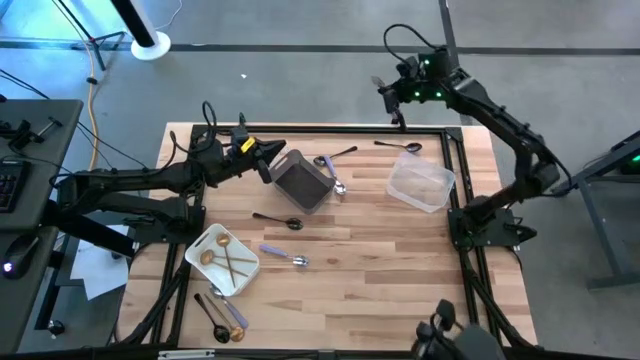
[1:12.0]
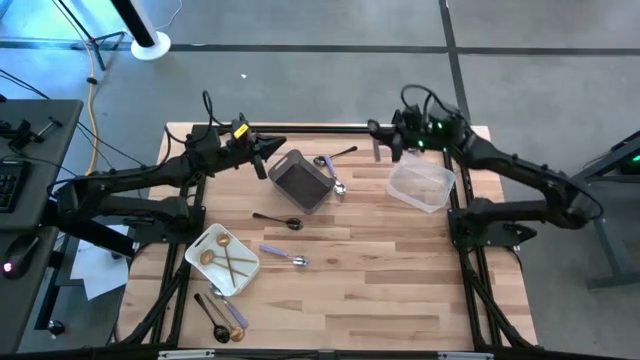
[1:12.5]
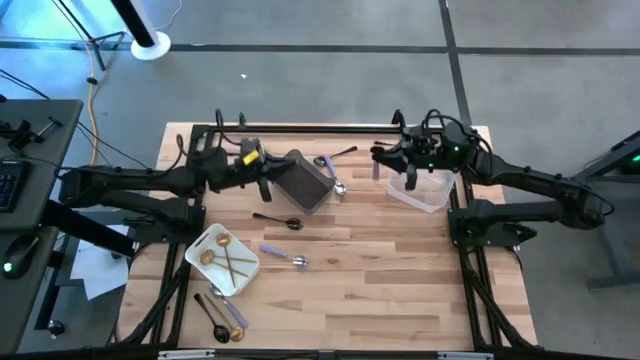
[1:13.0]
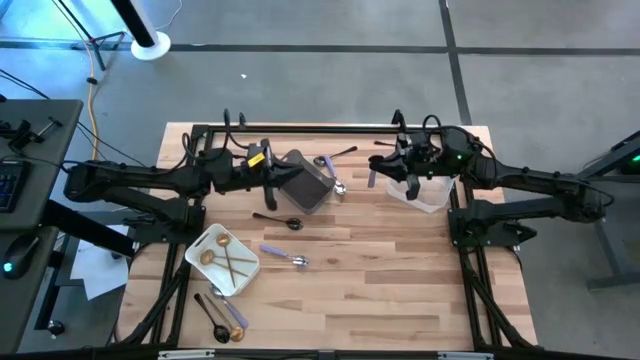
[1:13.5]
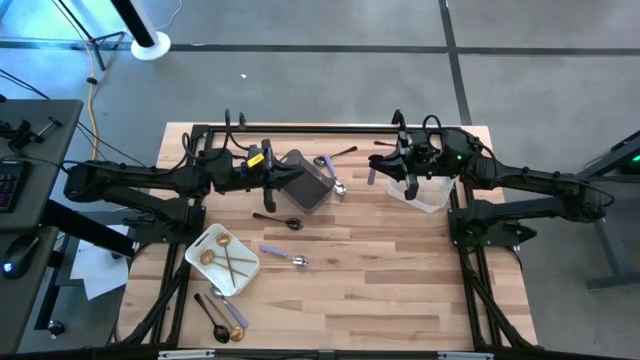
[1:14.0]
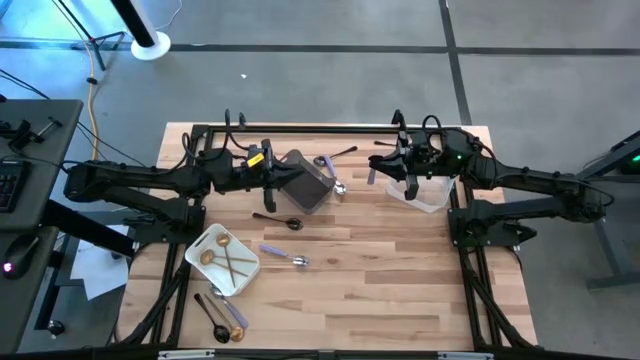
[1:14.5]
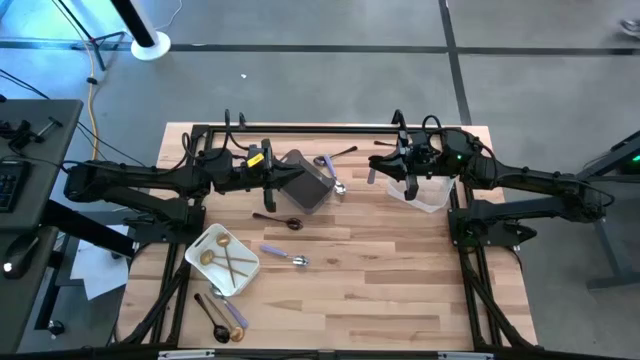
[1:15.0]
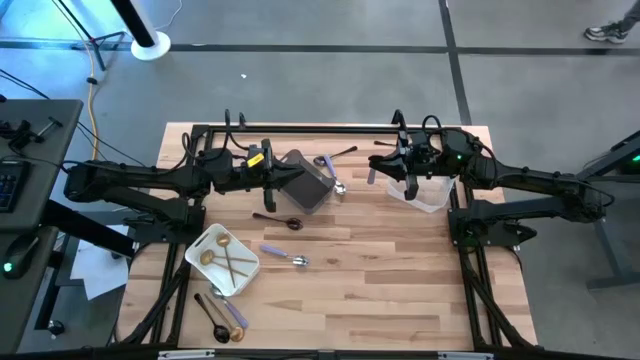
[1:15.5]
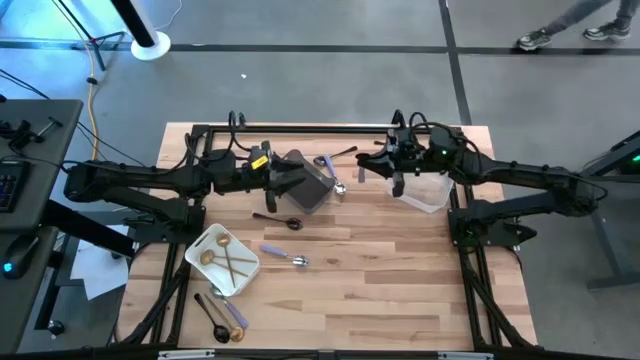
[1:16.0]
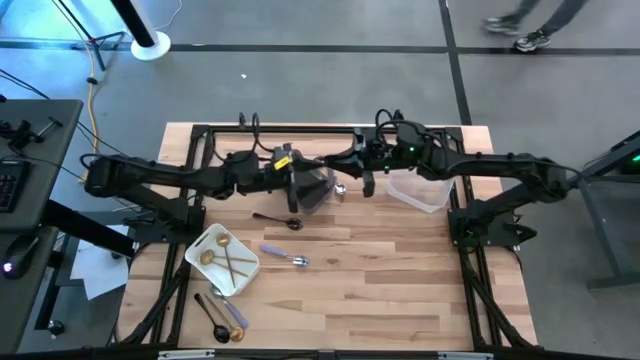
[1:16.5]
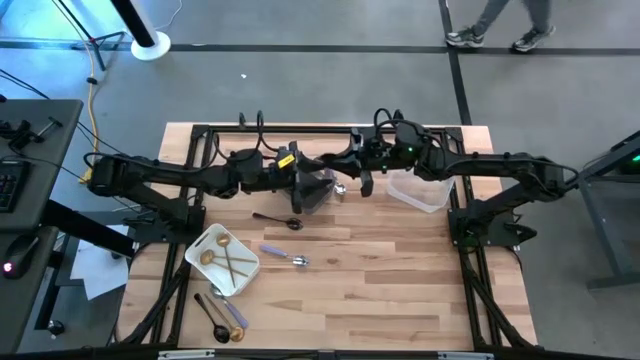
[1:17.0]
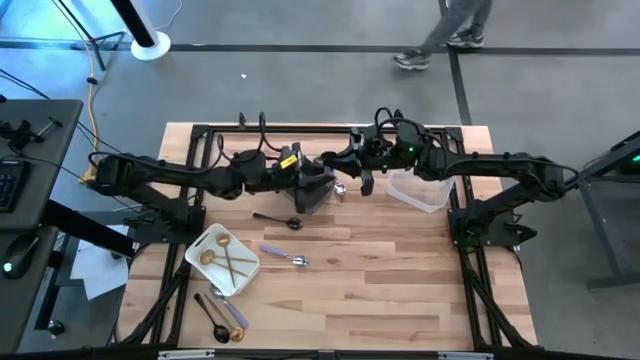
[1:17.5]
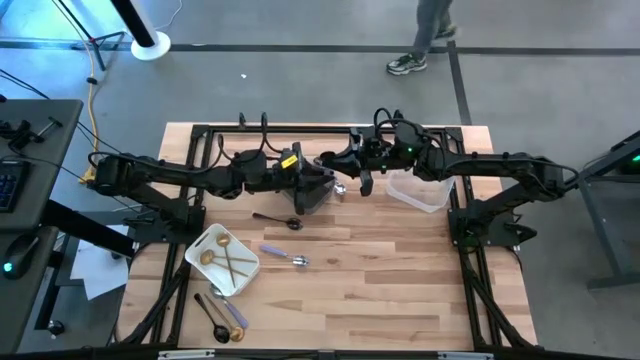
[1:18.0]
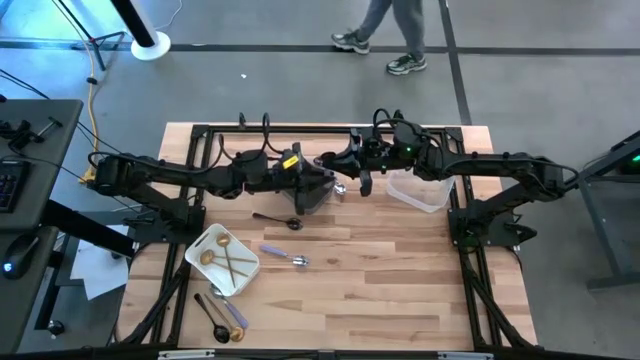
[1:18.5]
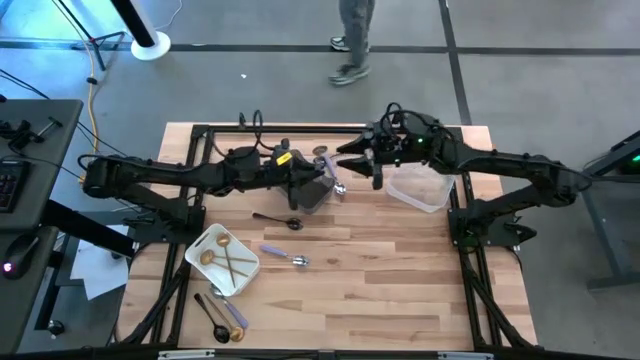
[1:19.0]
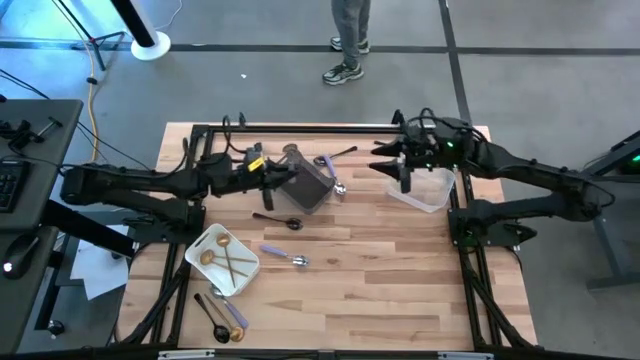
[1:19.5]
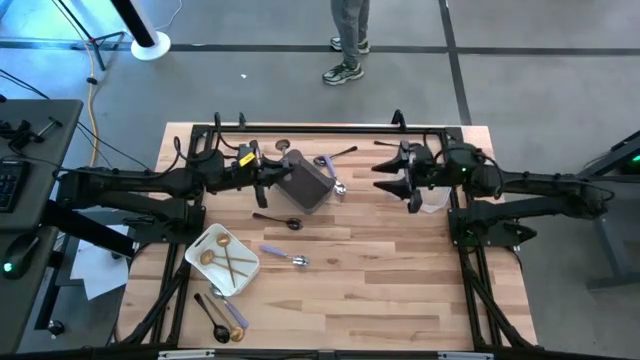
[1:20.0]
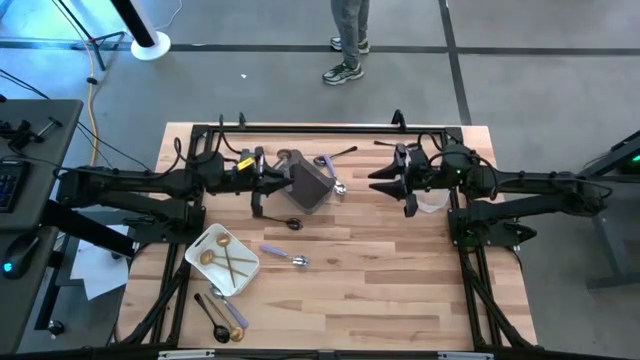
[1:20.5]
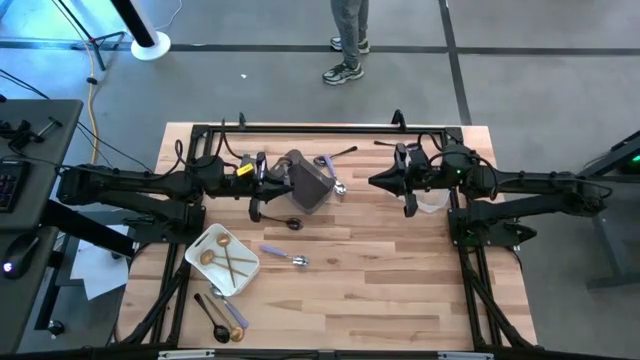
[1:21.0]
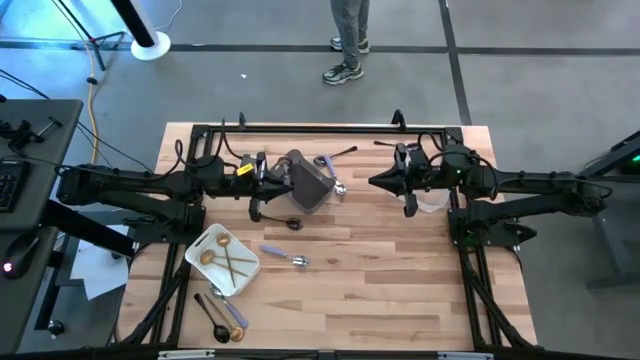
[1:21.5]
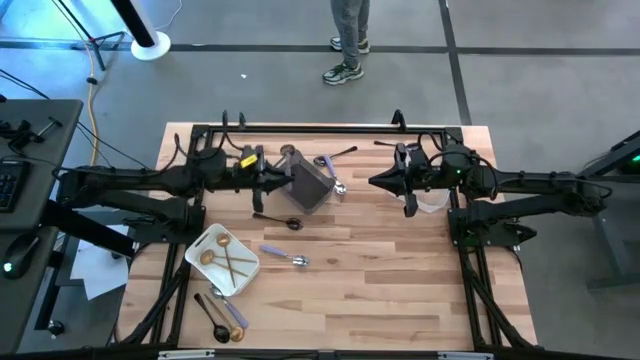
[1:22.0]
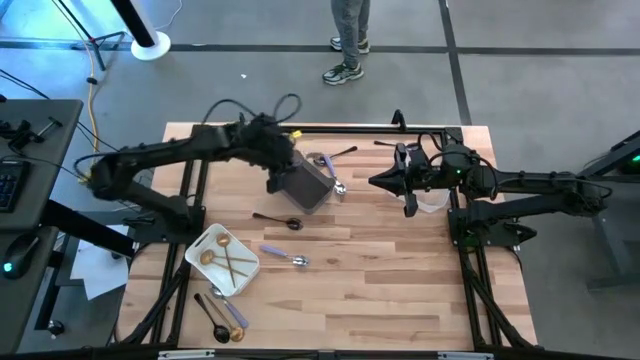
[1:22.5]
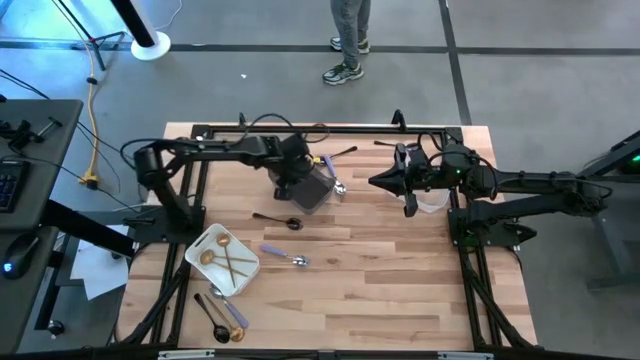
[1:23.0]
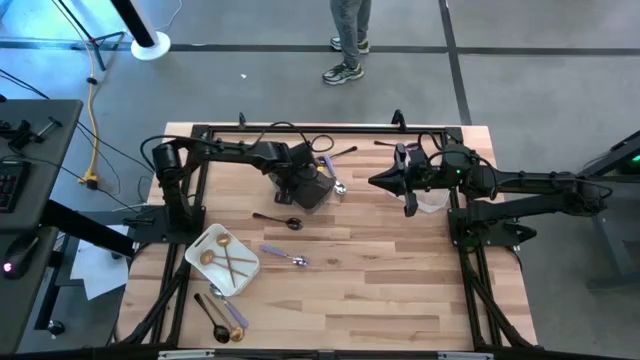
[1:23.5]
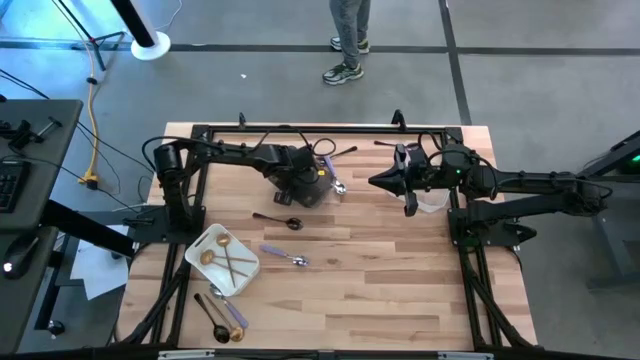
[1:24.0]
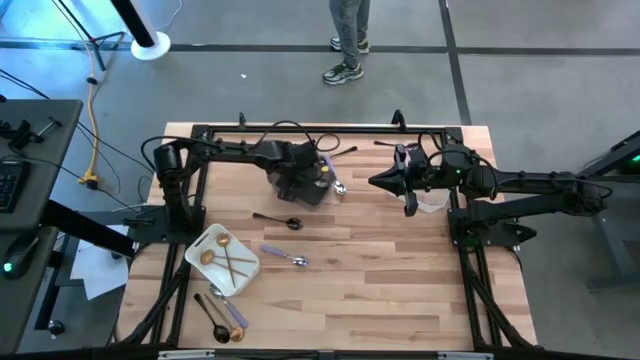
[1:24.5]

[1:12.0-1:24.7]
Task: Sort silverware by color (type)
Put the top right purple spoon into the black bin

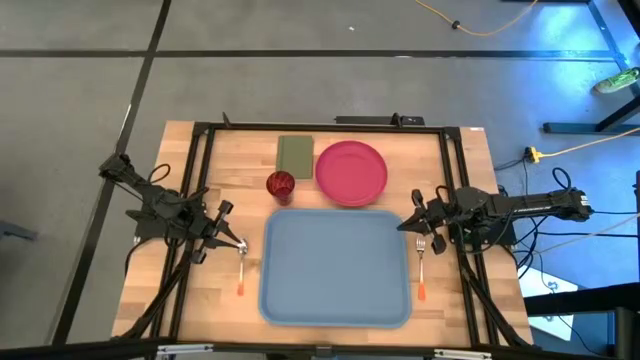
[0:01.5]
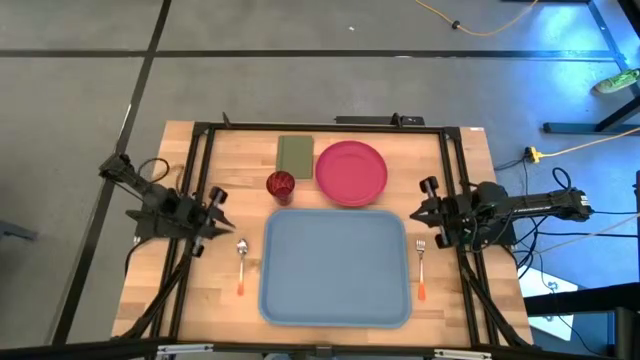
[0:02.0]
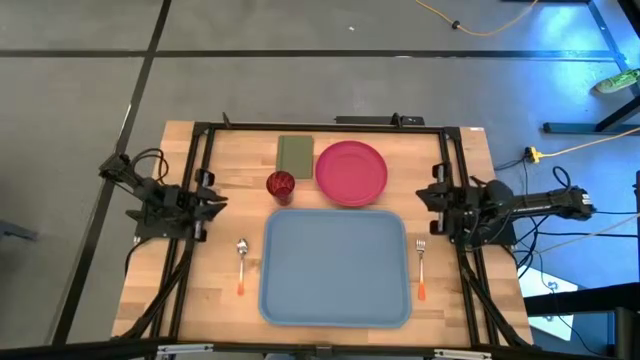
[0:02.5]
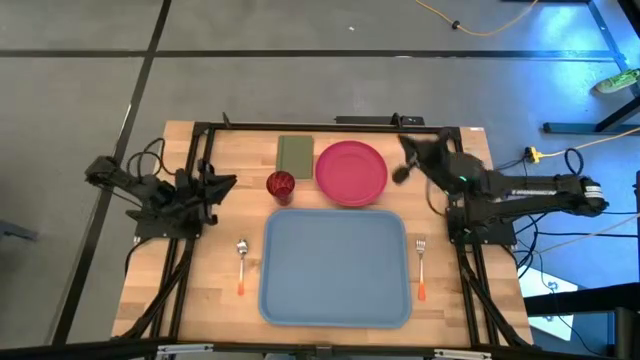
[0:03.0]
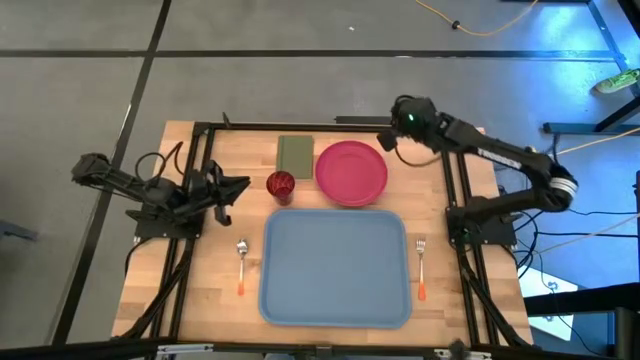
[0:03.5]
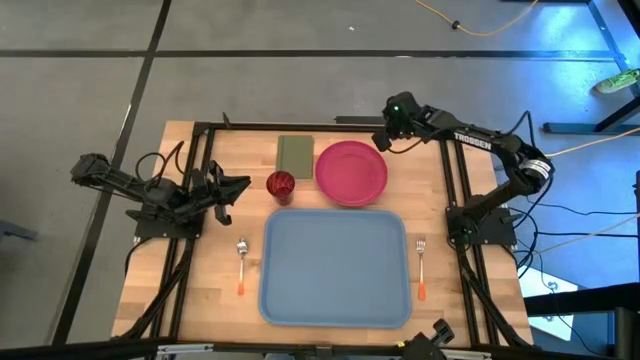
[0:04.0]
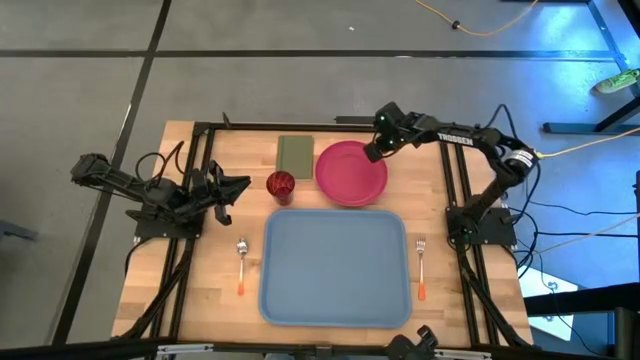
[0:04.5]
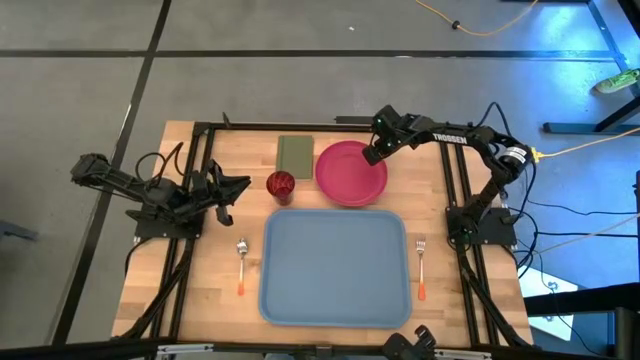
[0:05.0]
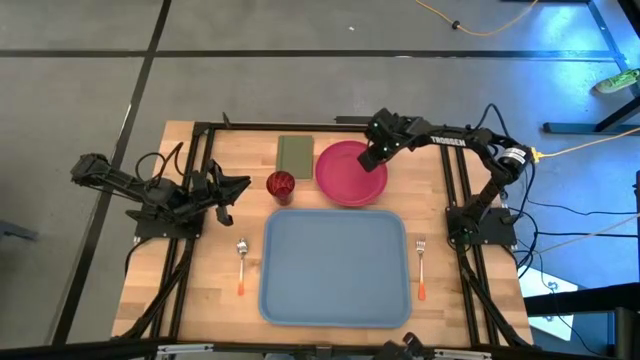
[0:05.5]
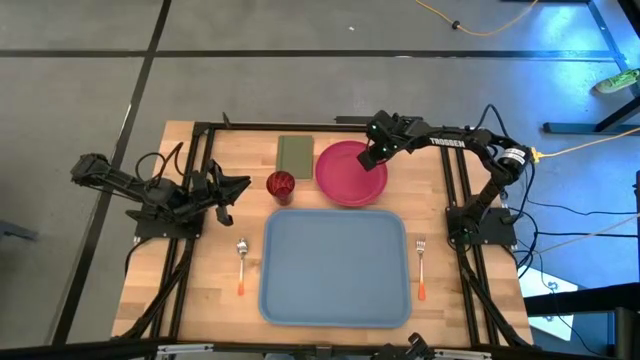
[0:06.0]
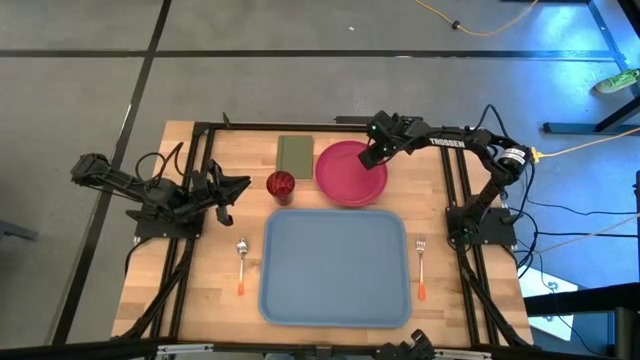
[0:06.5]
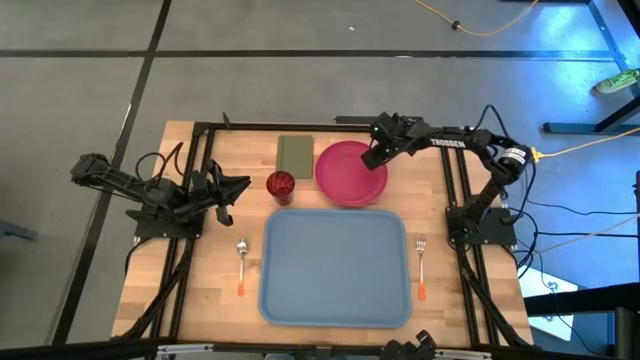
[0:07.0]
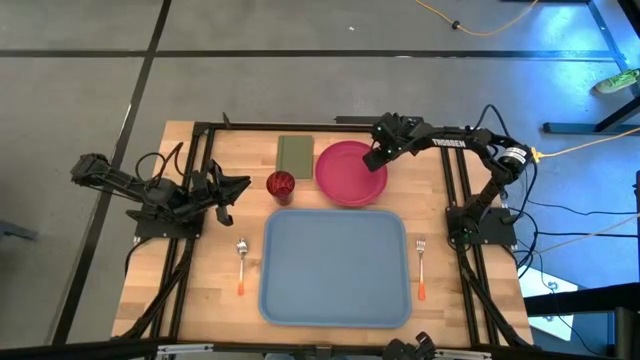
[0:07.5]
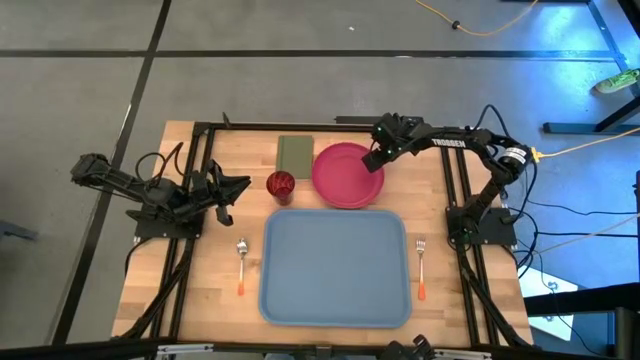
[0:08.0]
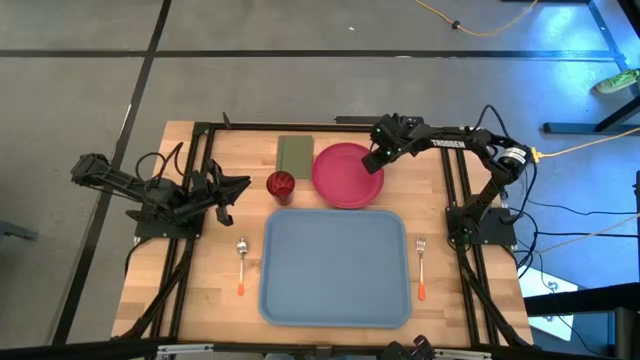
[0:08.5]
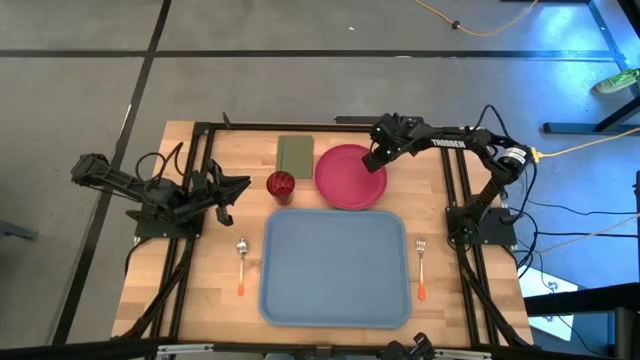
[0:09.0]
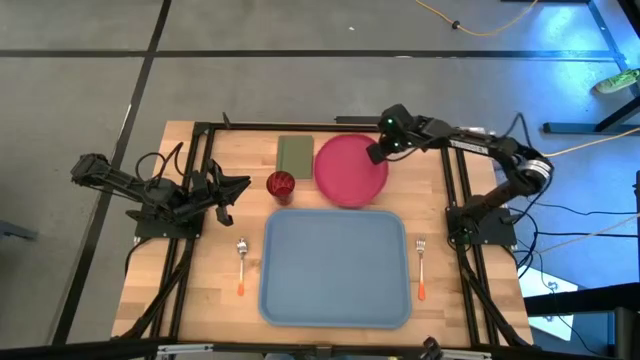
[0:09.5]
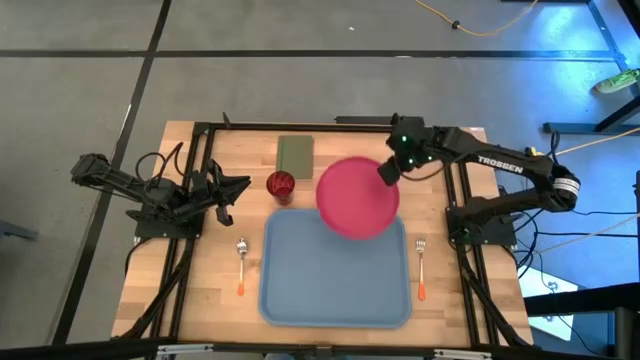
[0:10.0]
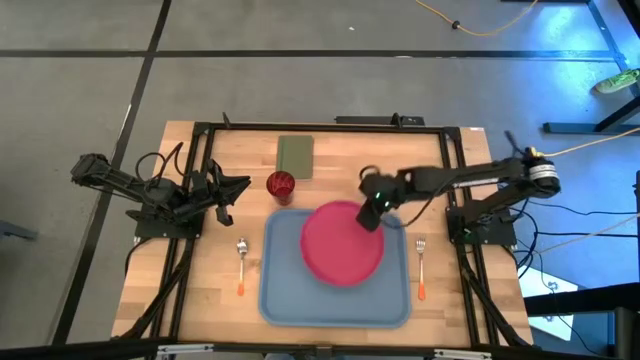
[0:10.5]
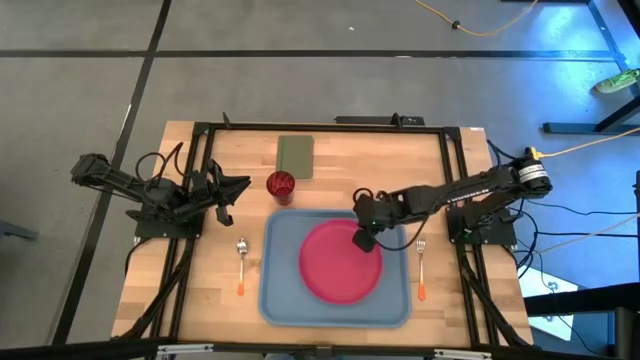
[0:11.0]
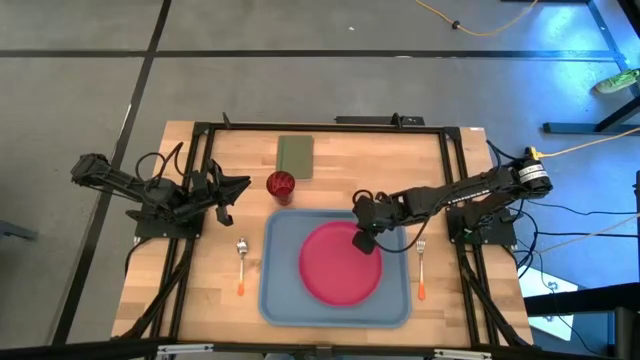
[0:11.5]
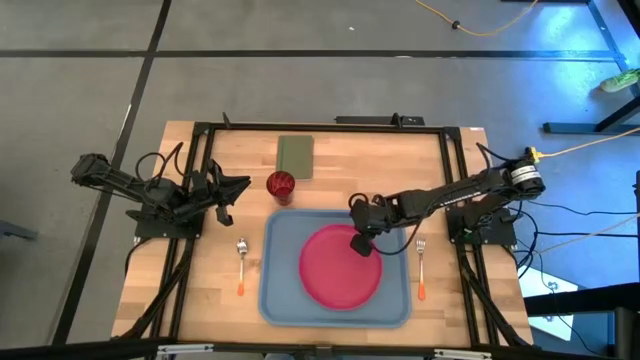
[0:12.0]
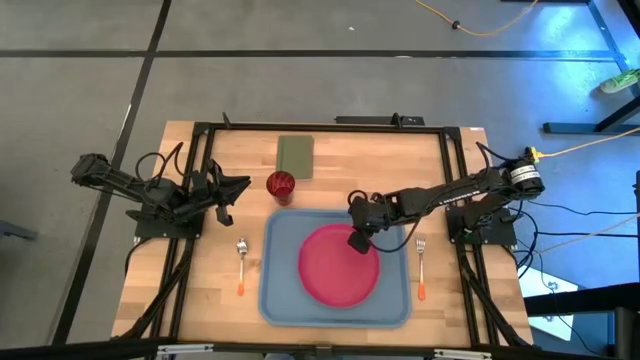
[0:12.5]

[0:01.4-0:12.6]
Task: Pick and place plate/cup/fork/spoon on tray
Put the pink plate on the blue tray
